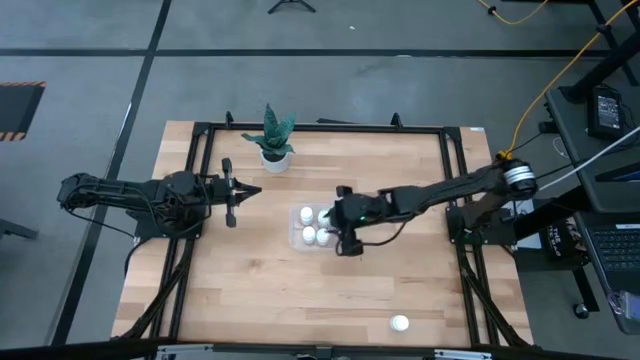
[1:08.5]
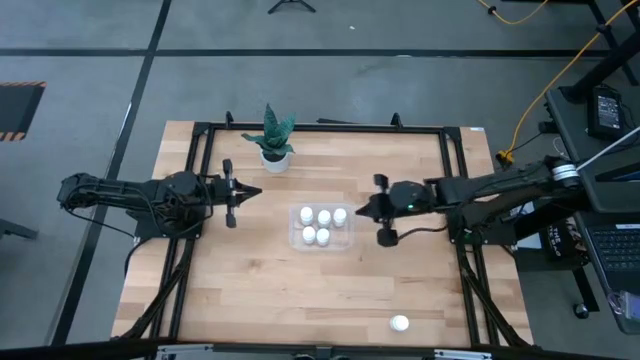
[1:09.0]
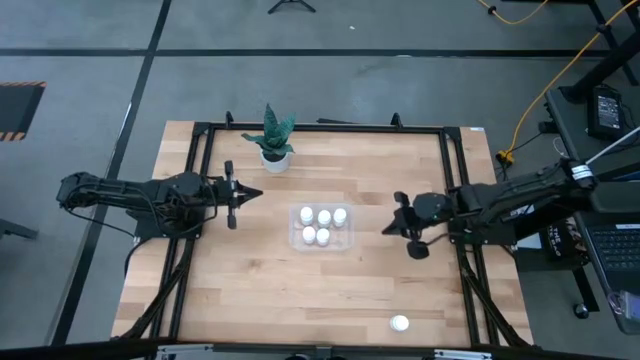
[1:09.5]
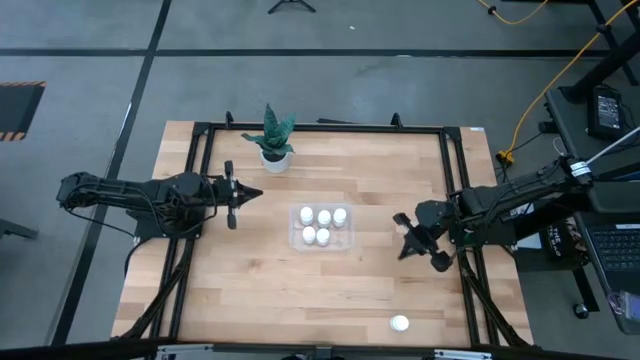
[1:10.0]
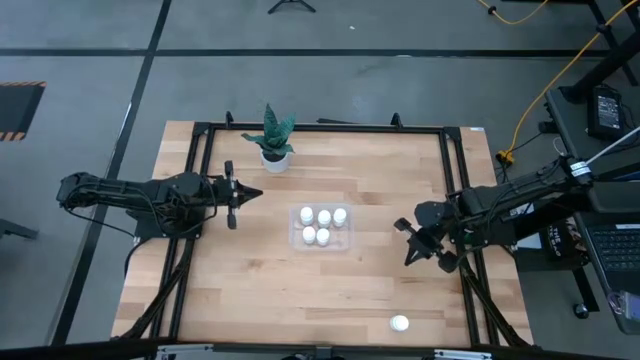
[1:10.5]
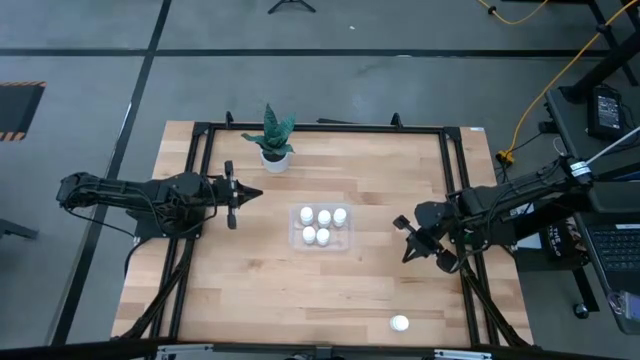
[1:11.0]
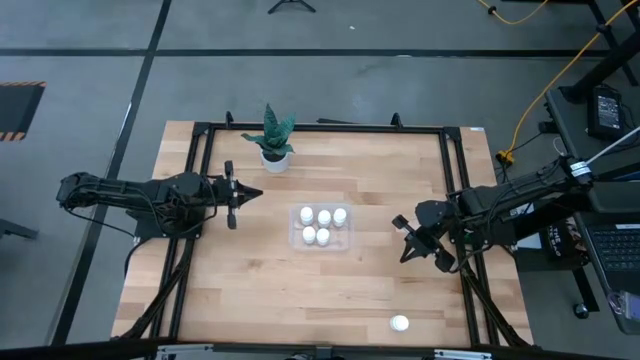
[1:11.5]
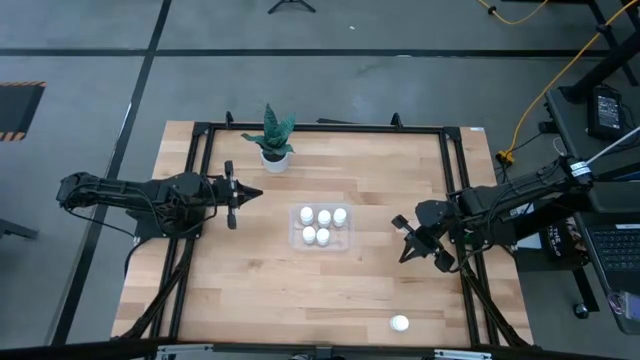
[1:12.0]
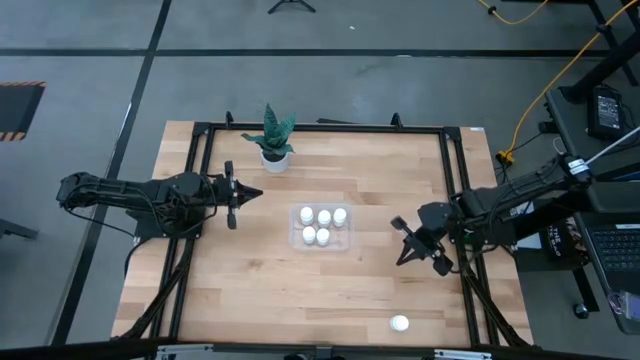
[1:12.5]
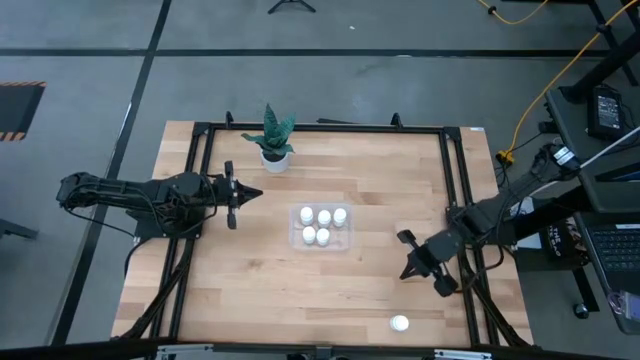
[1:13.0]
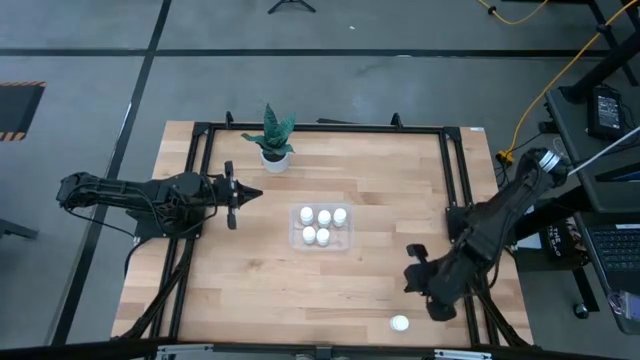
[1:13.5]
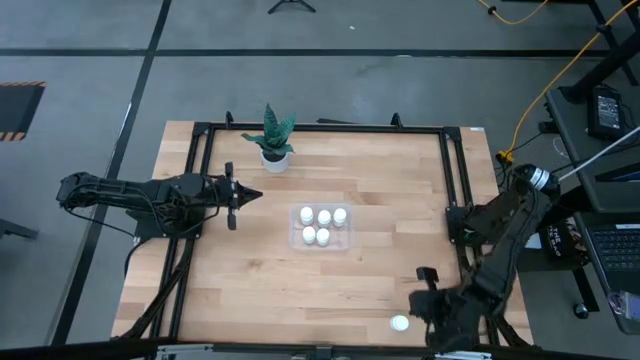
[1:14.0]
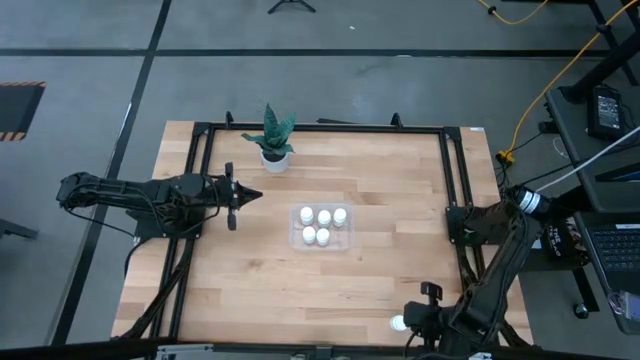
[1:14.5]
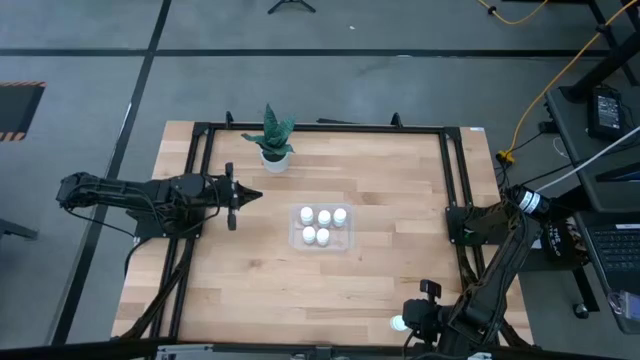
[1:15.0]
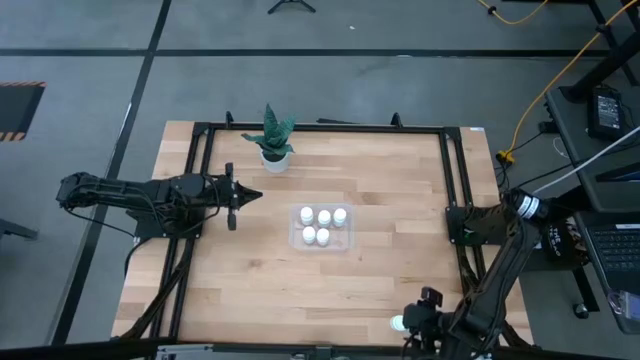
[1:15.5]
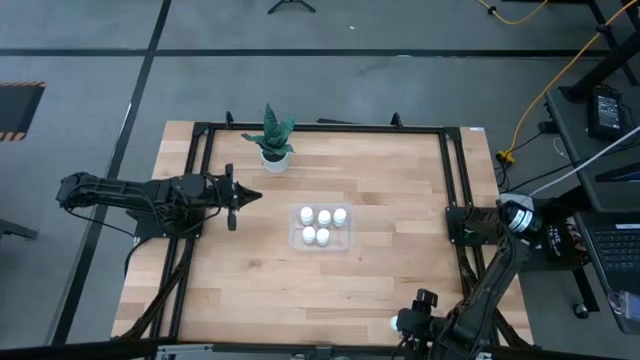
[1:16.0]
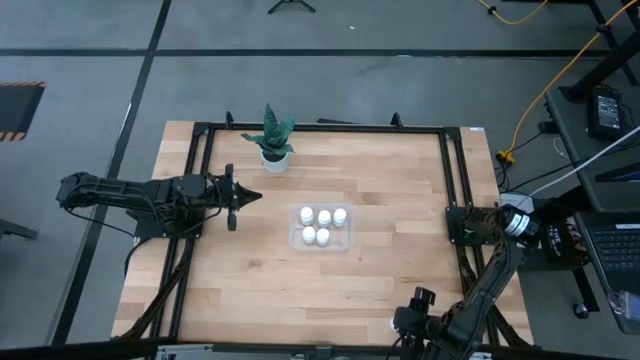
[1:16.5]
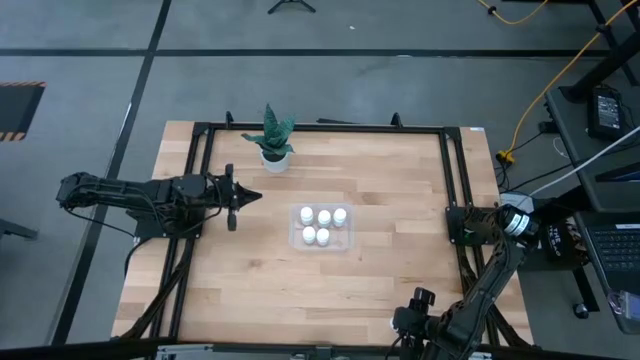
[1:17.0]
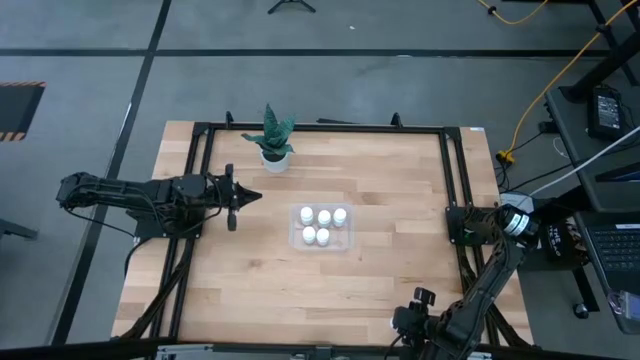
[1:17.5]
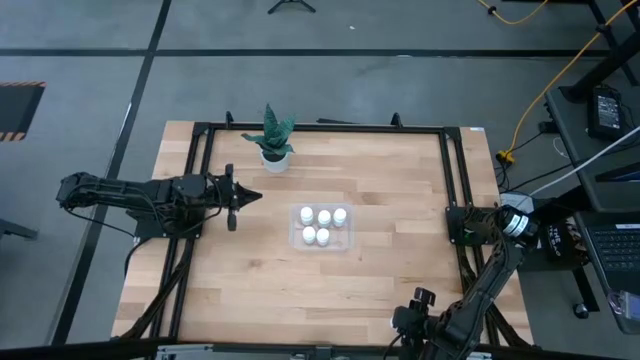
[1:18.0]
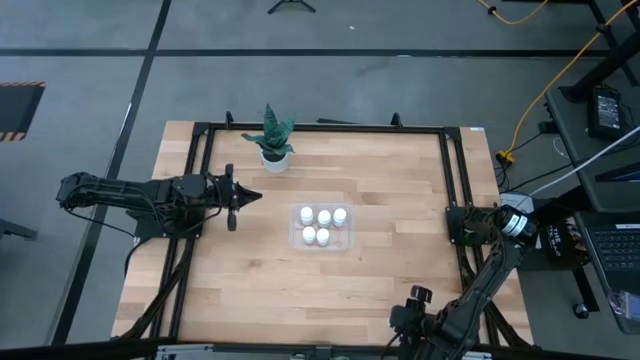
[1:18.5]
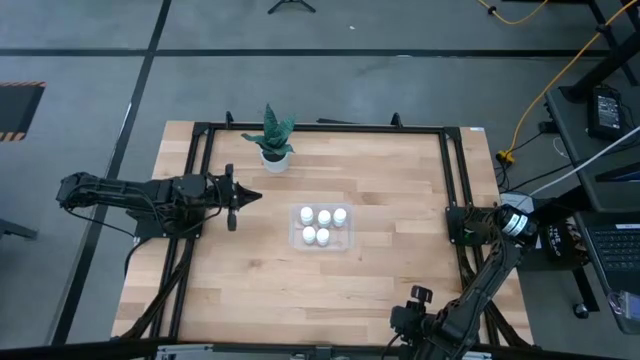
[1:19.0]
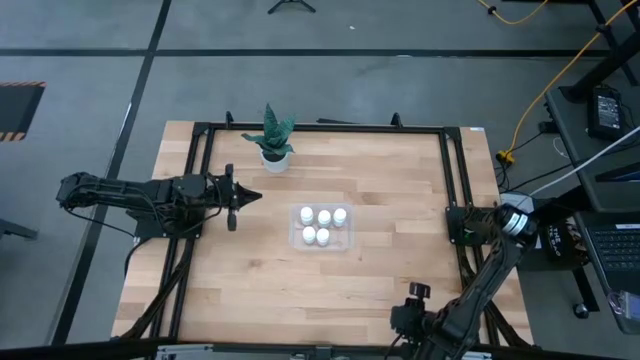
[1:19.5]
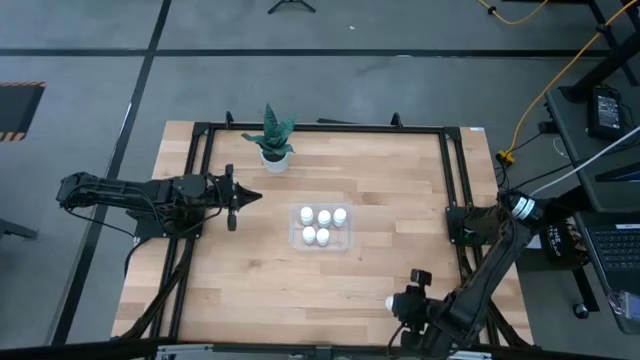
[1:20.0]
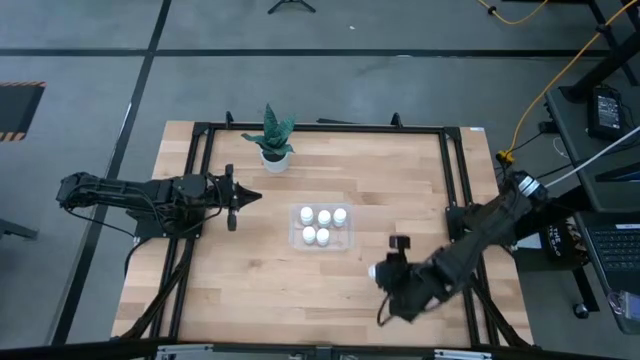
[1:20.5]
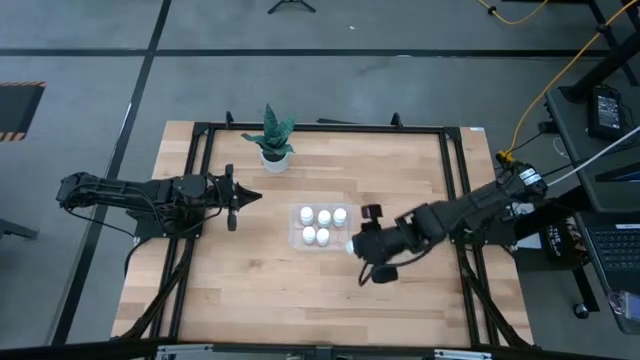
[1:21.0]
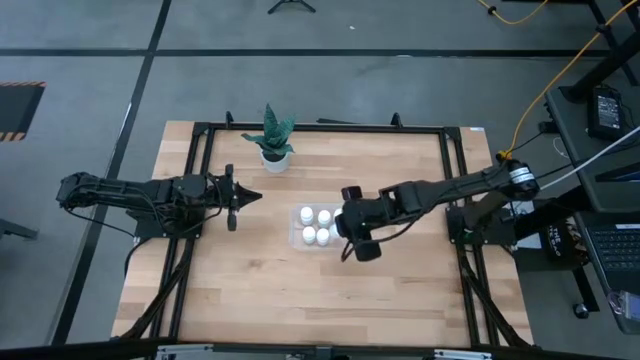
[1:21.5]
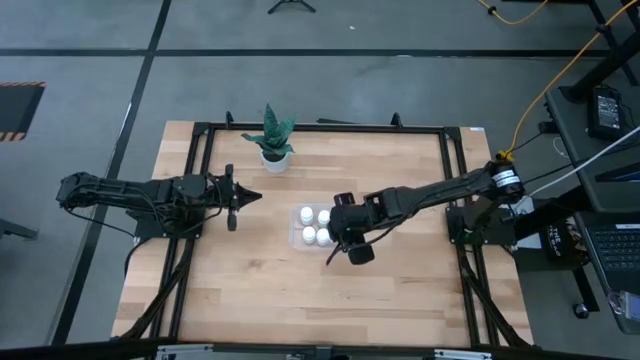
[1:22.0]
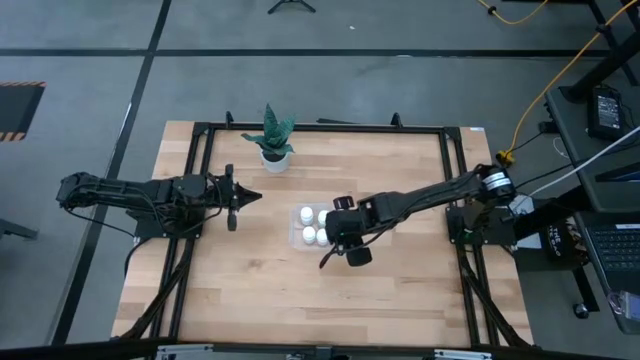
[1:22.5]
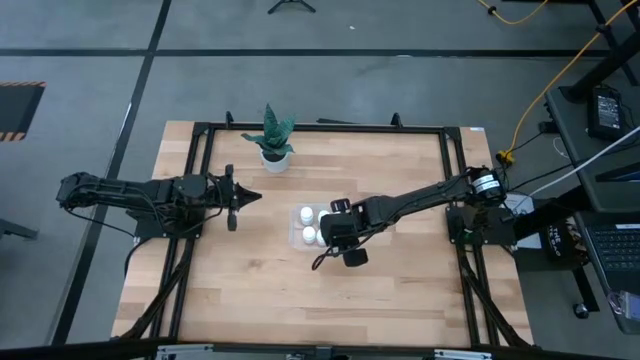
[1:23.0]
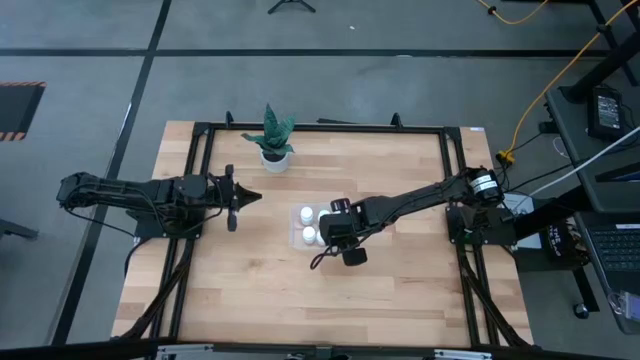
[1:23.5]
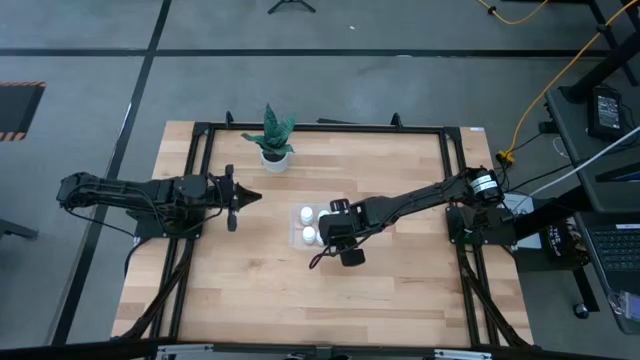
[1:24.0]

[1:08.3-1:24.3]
Task: Pick and place pill bottles into a basket
Put the white medicine bottle into the transparent bin

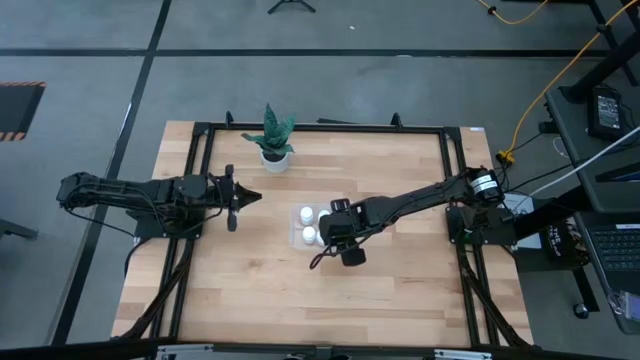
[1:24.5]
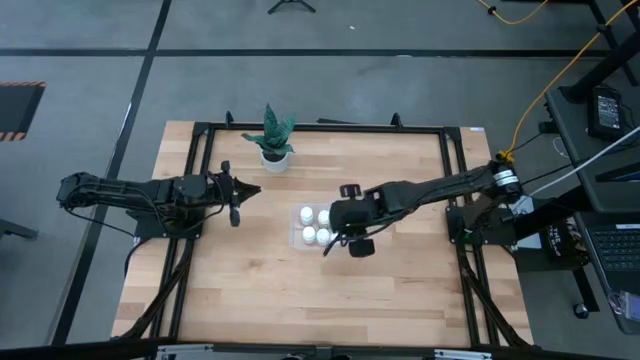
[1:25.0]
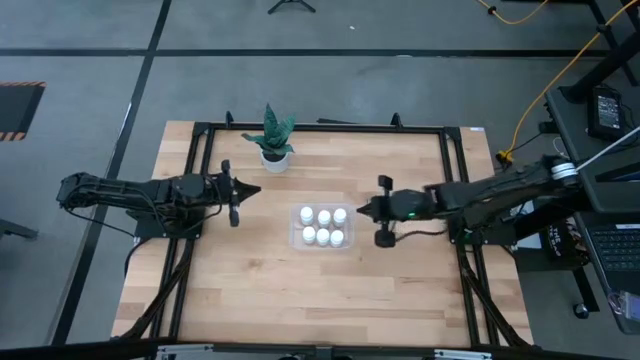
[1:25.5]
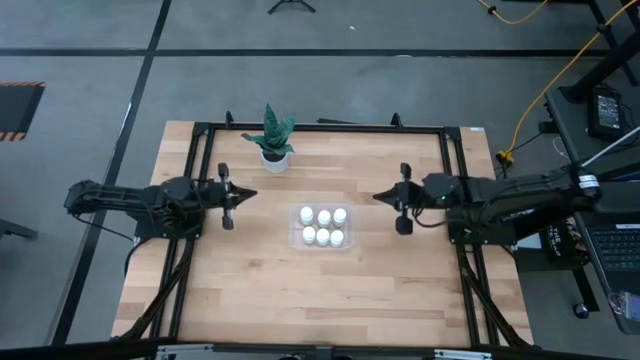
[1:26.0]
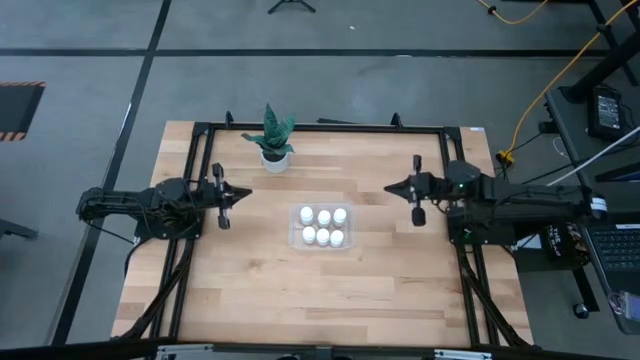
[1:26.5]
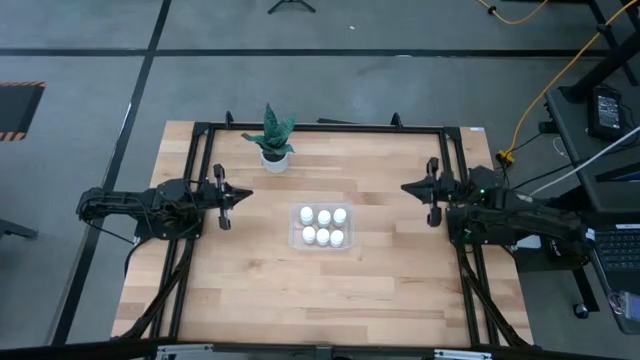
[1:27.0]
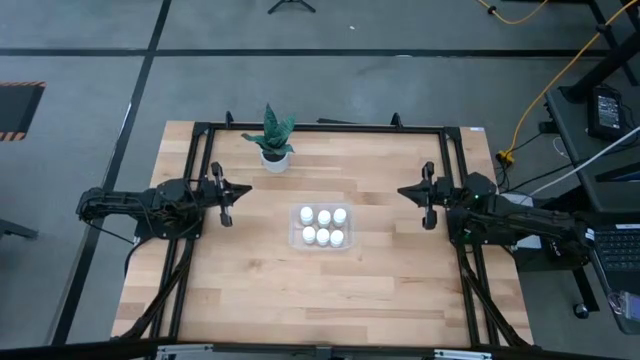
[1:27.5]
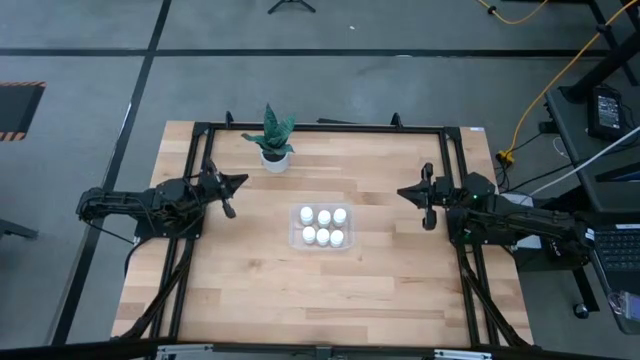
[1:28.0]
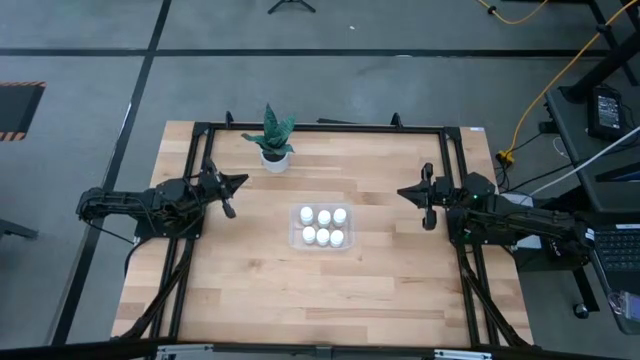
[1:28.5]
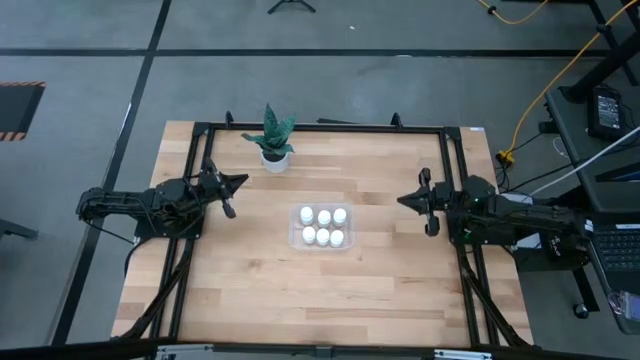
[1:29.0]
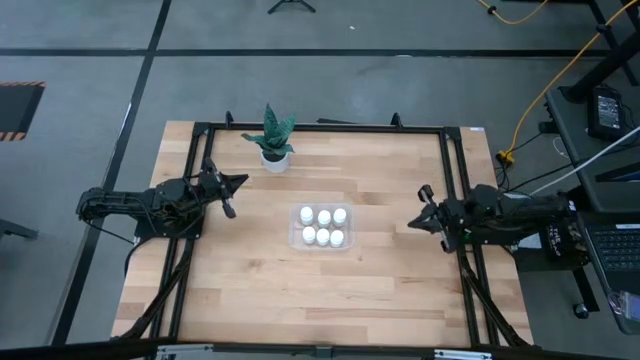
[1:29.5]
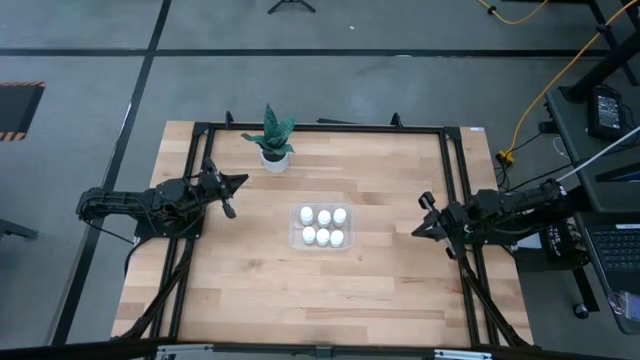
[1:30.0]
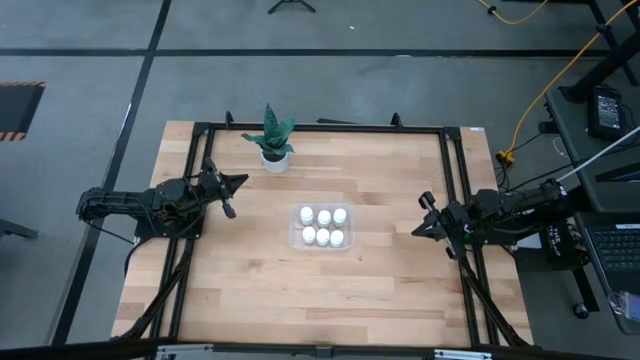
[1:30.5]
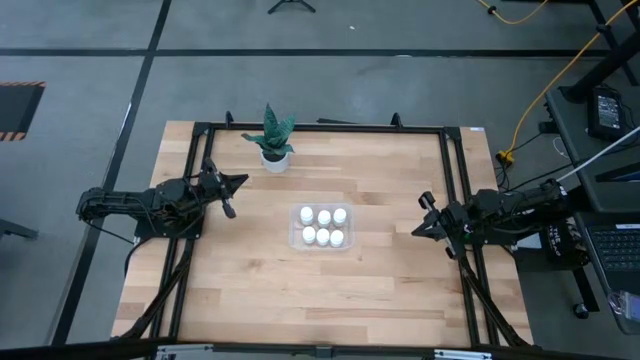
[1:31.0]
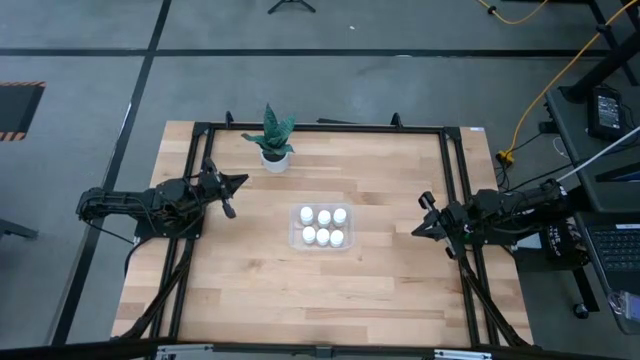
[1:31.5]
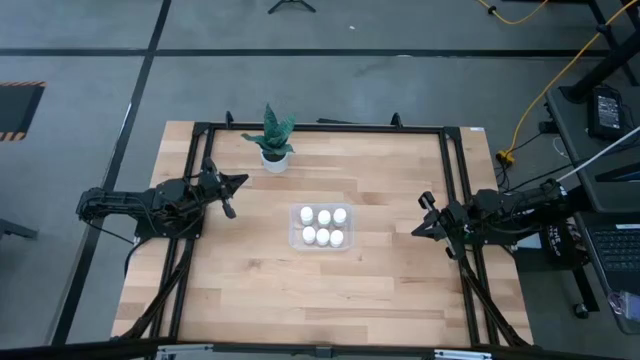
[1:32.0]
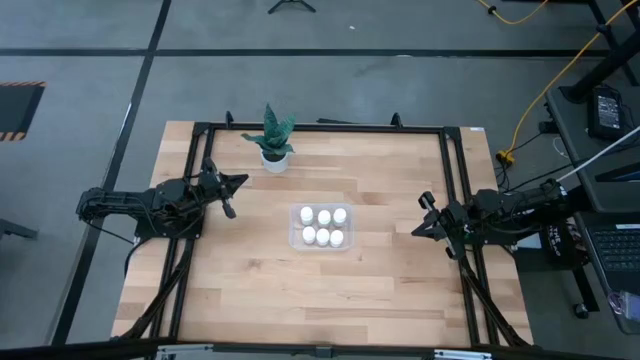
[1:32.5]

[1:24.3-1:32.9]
Return to Home Position
